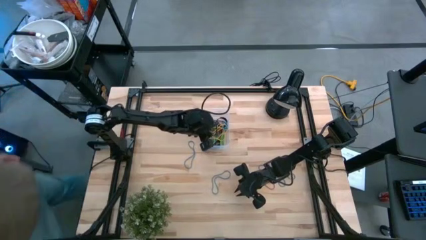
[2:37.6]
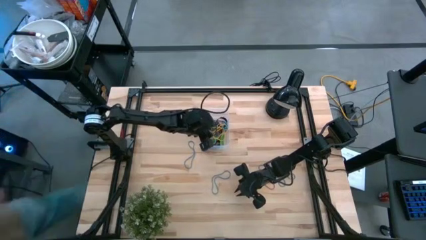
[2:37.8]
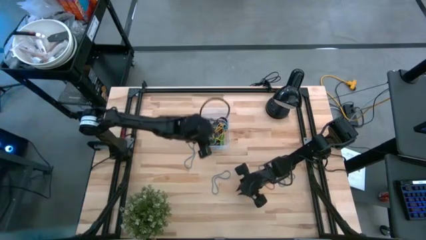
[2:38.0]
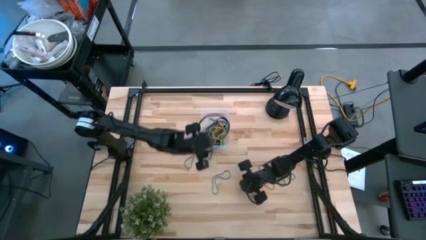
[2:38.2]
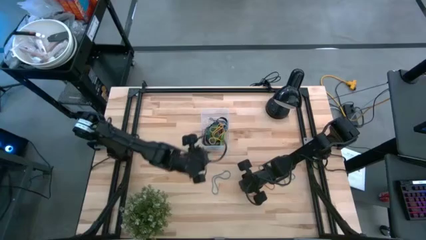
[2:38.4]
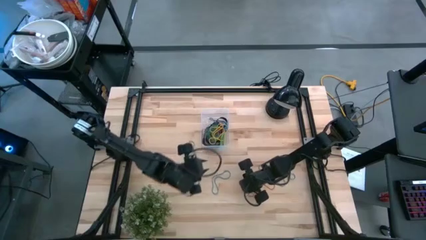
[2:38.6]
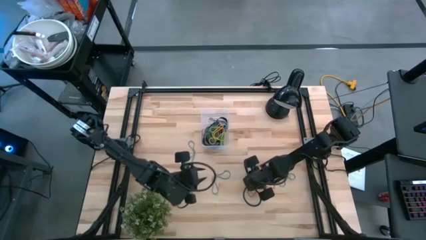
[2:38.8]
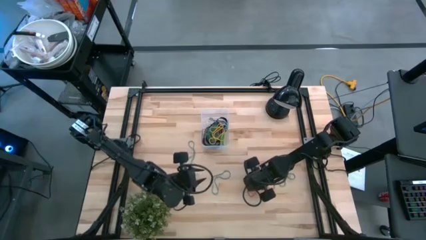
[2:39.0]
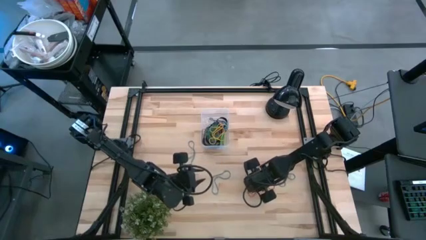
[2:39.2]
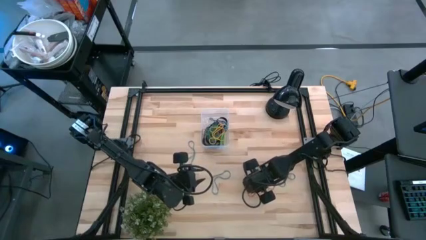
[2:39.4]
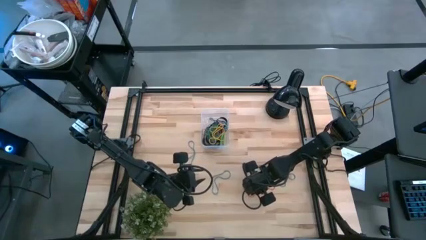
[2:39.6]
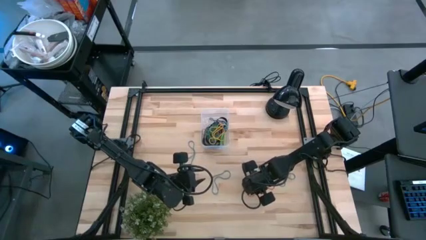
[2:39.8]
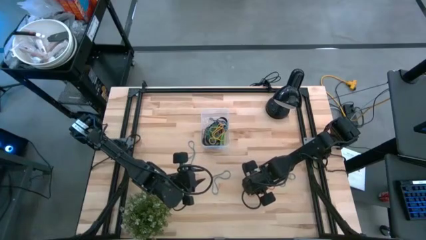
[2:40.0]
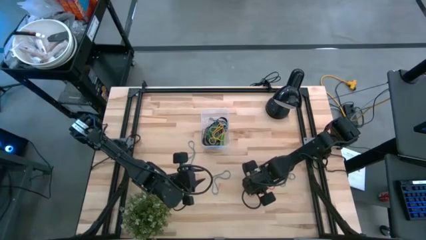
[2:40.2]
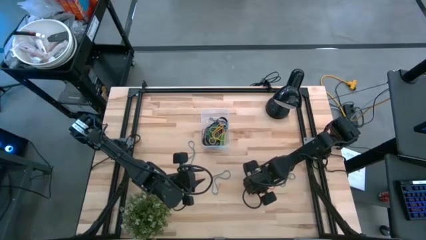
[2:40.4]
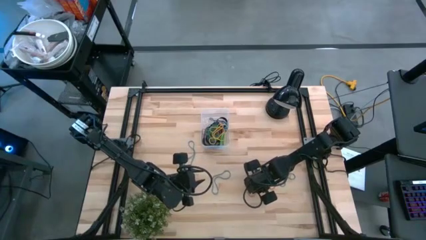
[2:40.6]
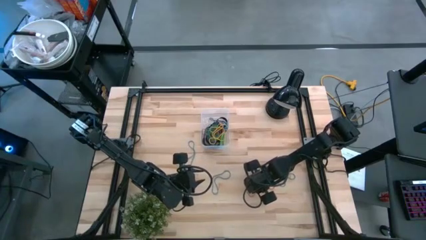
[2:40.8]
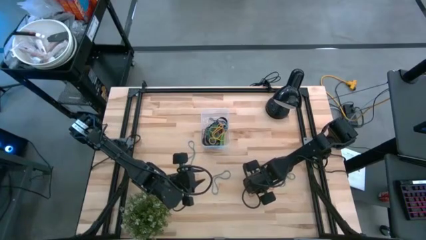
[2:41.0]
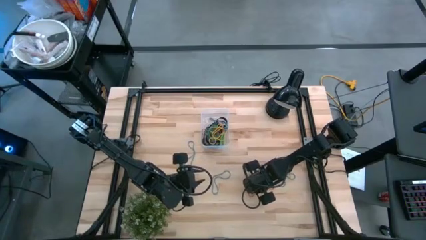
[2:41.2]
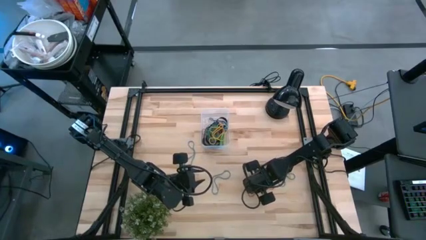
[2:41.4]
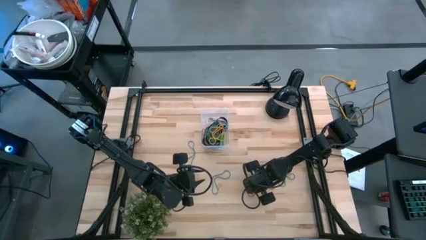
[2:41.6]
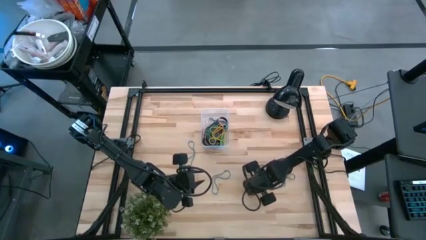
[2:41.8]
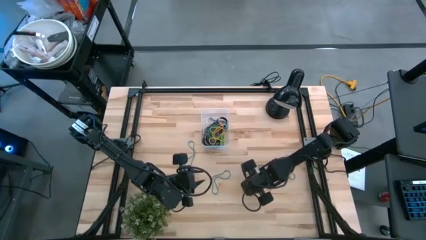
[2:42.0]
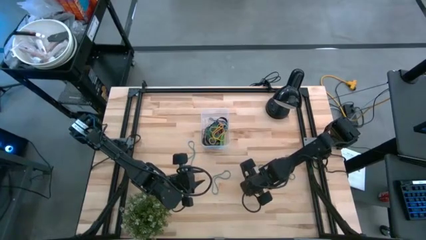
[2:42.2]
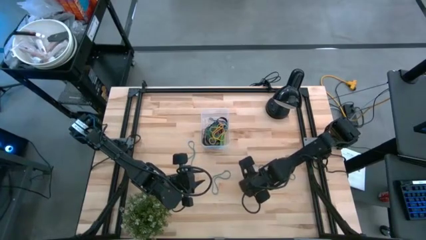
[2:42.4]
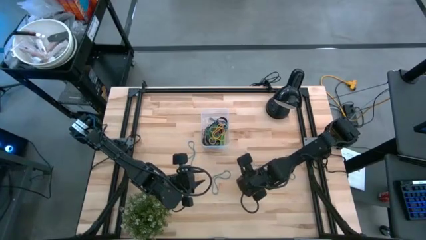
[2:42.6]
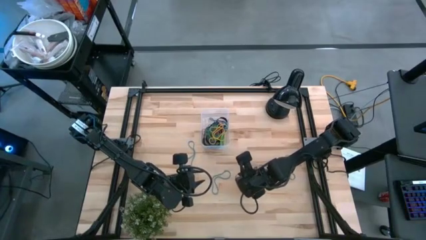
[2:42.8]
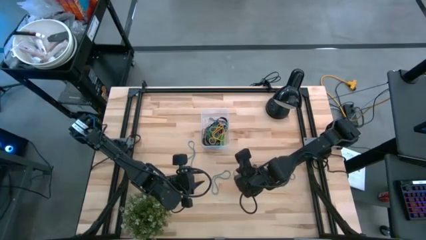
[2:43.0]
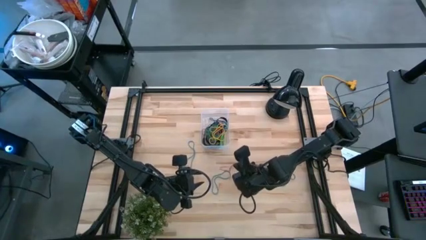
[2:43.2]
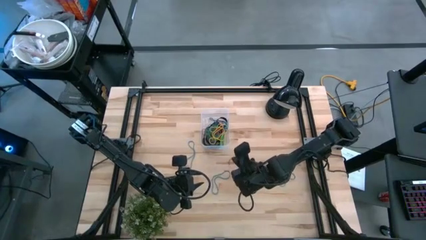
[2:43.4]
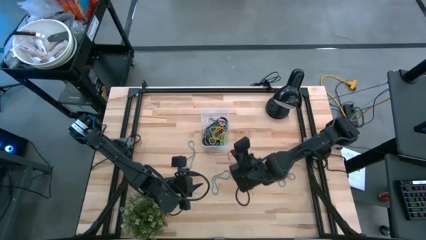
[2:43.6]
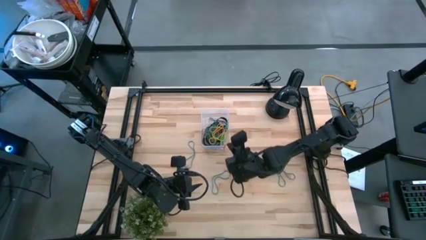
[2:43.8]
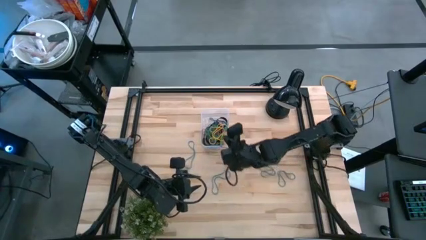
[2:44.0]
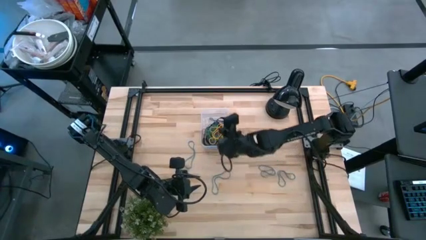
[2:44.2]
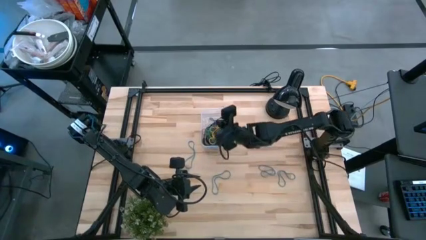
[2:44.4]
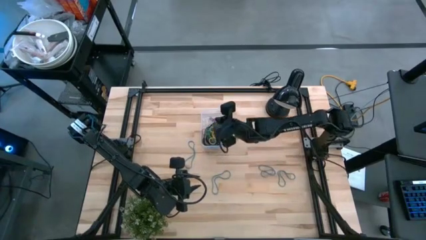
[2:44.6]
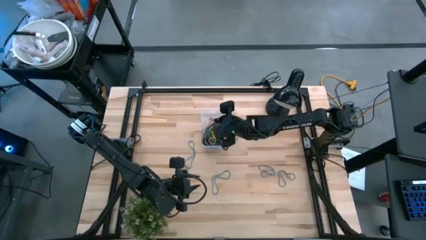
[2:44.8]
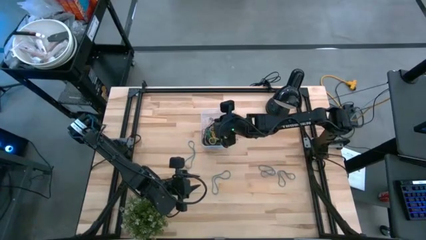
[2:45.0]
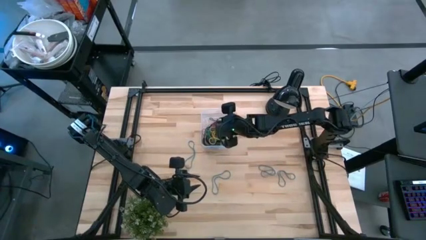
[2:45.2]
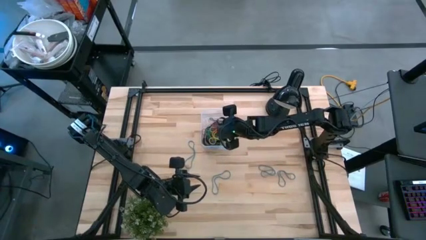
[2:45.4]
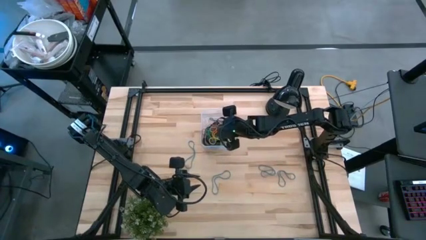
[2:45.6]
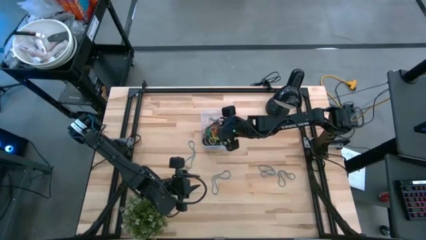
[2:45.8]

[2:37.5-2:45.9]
Task: Pick and place rubber bands into bin
Put the red rubber band into the transparent bin

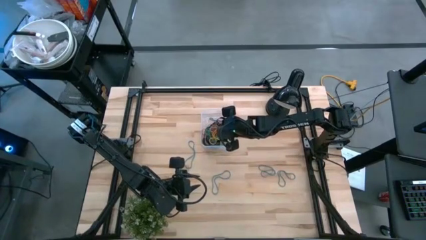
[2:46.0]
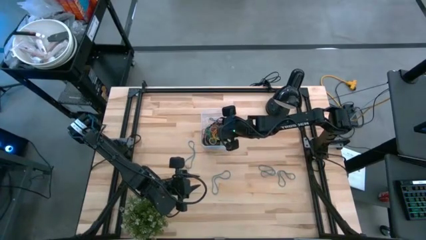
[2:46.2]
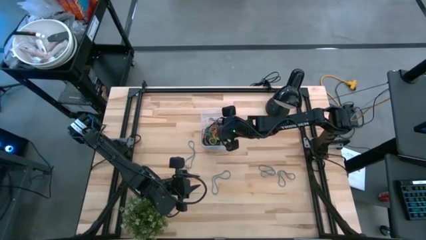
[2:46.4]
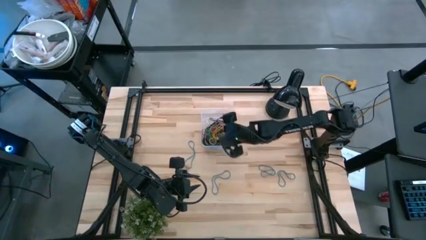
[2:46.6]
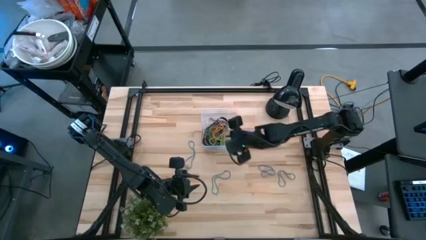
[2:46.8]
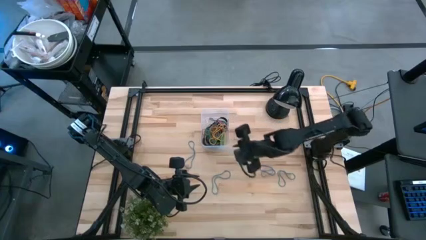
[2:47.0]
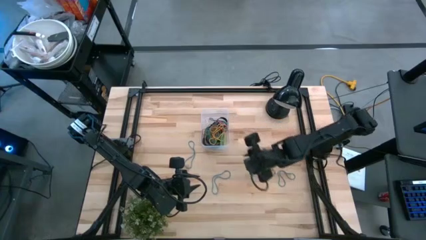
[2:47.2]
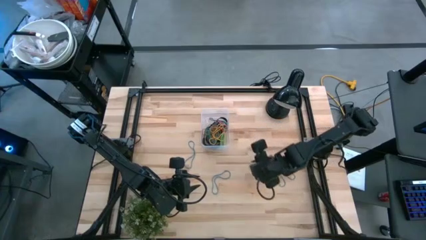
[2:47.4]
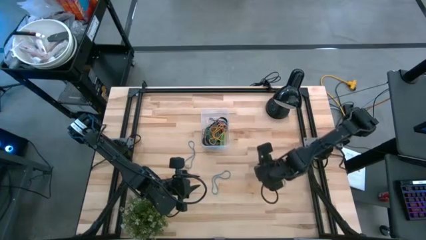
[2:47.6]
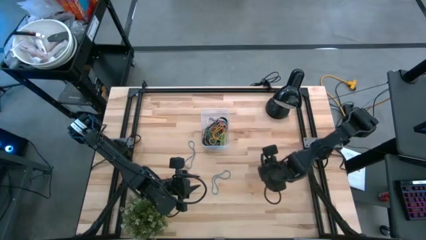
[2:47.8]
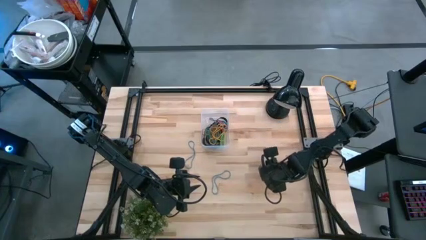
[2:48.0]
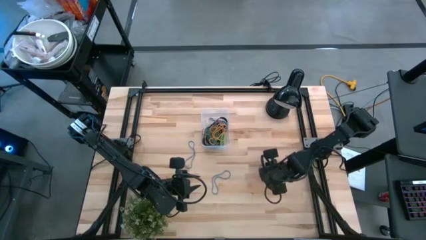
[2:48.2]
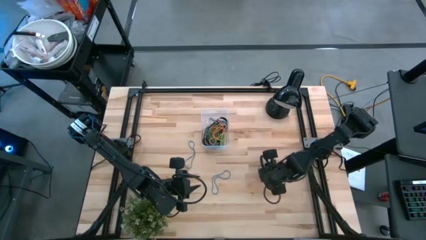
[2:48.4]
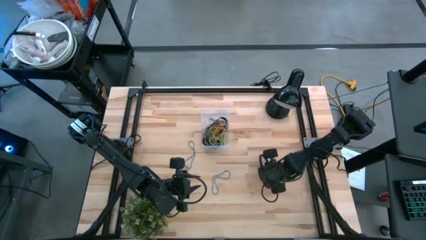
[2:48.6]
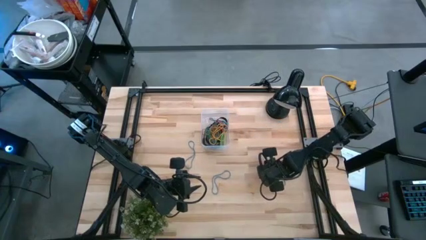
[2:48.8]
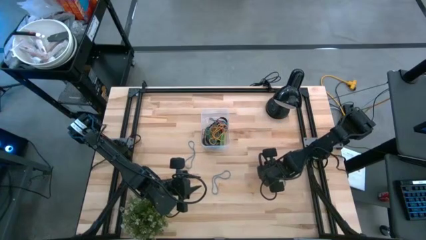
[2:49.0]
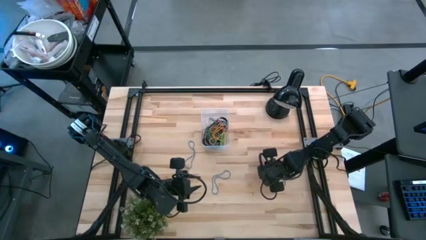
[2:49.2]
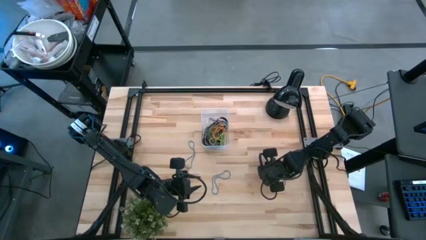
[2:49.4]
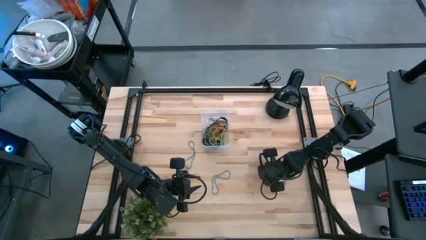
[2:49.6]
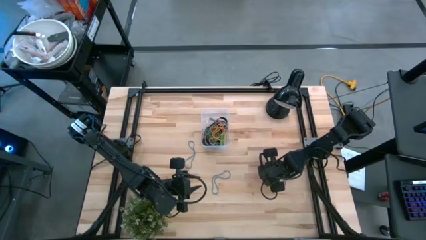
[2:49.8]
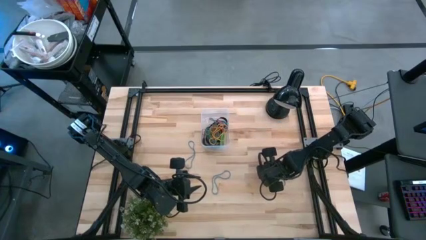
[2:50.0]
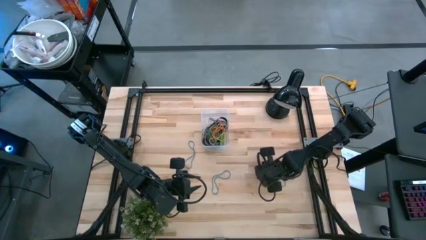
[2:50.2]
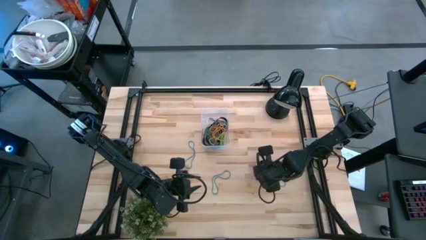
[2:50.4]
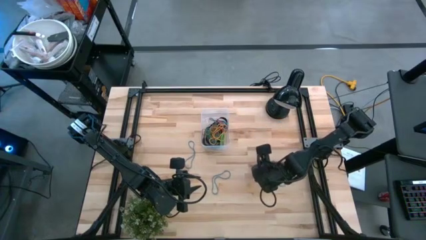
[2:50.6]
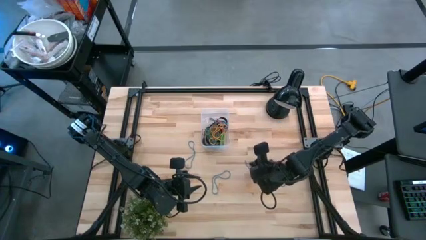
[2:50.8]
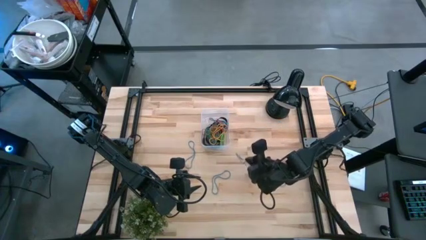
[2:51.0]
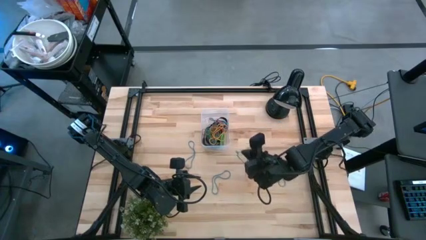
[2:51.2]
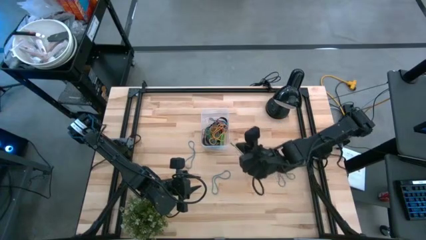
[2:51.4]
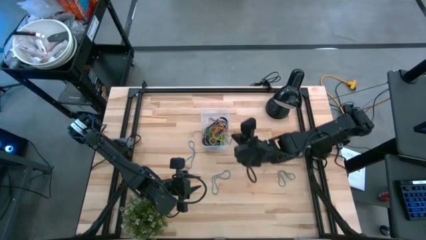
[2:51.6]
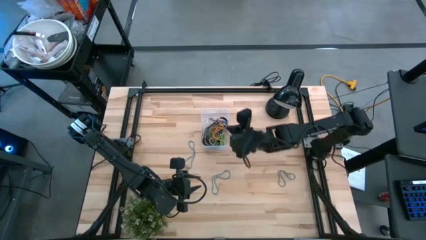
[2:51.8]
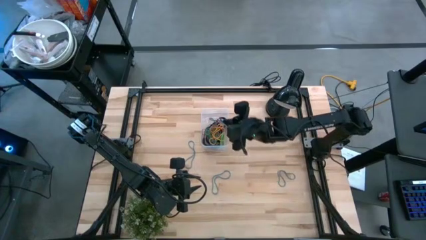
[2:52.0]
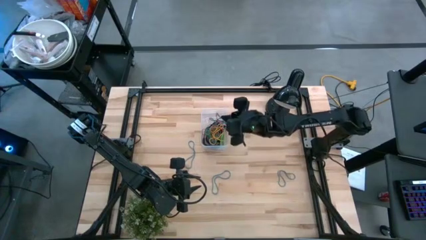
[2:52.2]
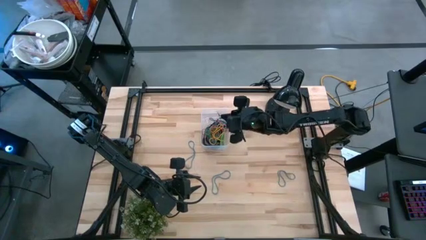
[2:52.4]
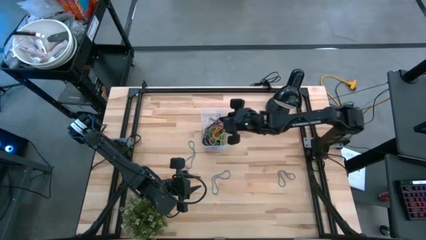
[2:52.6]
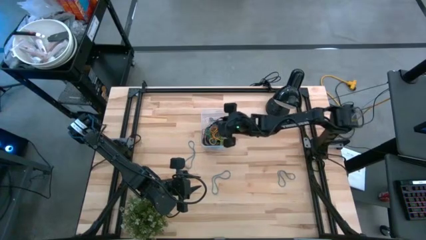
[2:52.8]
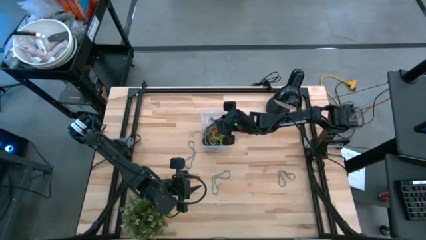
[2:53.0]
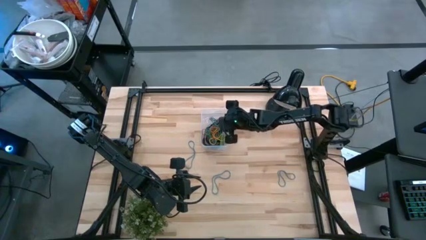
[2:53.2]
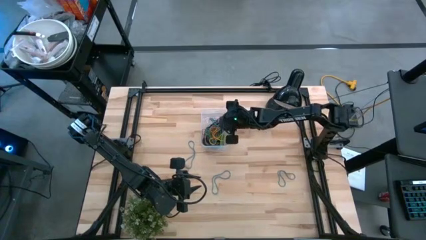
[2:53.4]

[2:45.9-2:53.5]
Put the blue rubber band into the transparent bin
